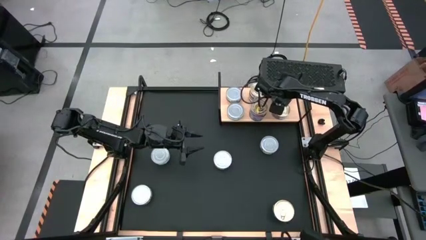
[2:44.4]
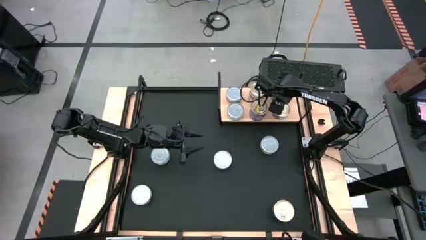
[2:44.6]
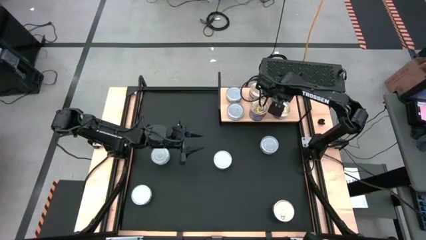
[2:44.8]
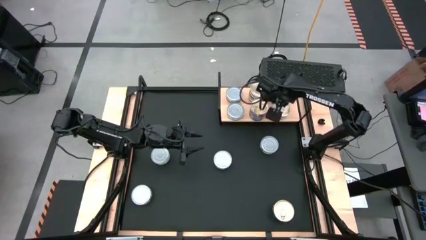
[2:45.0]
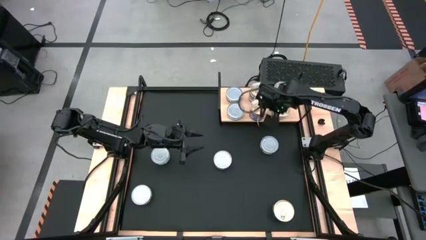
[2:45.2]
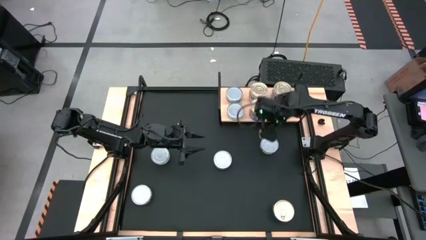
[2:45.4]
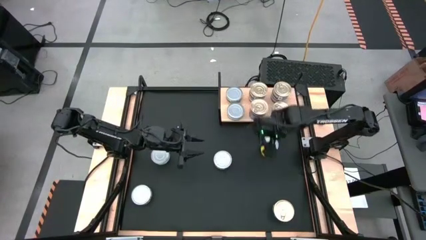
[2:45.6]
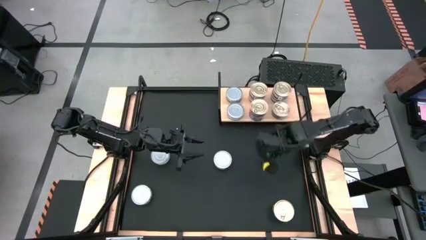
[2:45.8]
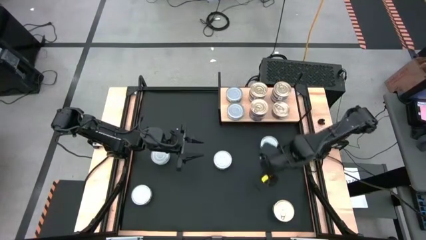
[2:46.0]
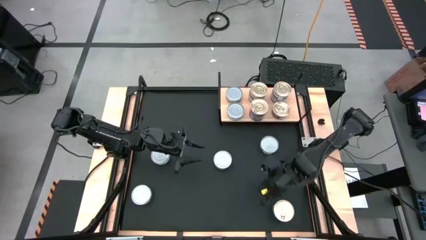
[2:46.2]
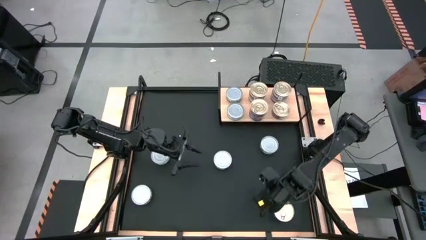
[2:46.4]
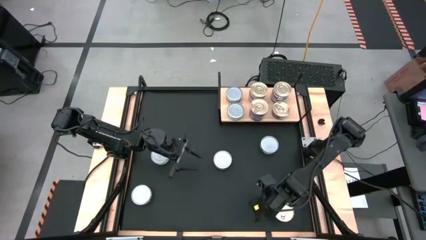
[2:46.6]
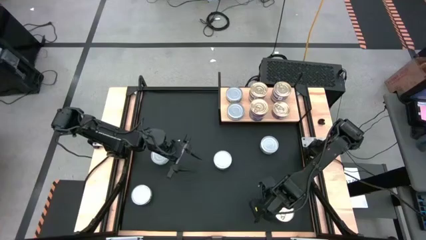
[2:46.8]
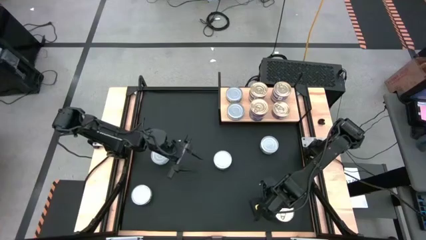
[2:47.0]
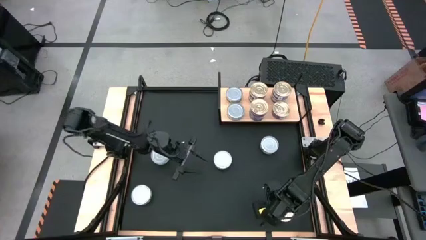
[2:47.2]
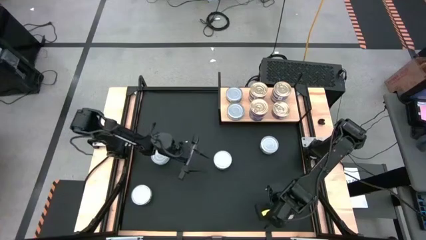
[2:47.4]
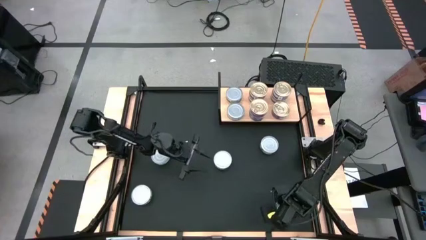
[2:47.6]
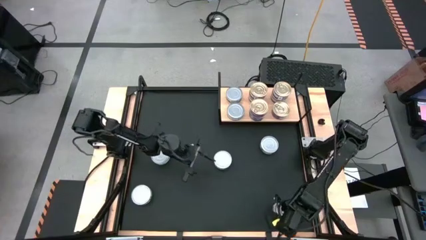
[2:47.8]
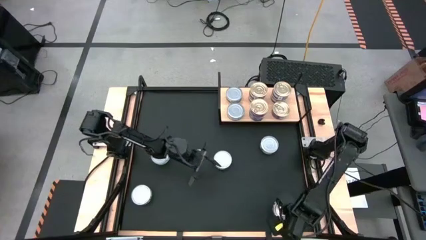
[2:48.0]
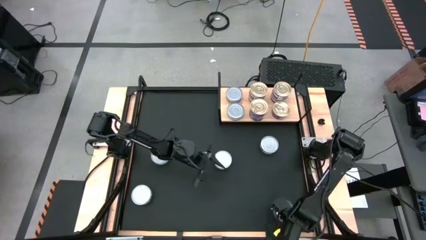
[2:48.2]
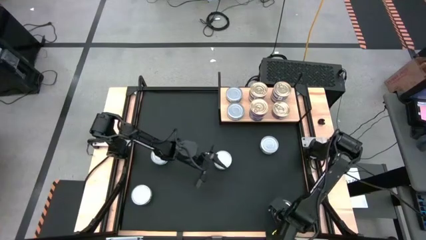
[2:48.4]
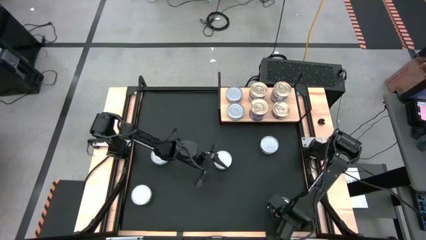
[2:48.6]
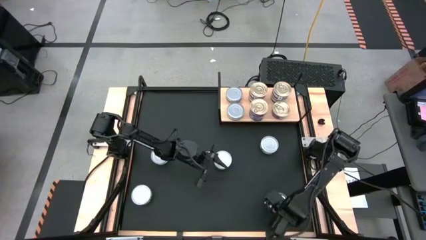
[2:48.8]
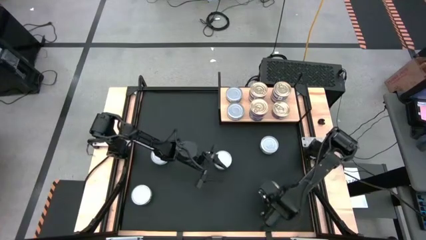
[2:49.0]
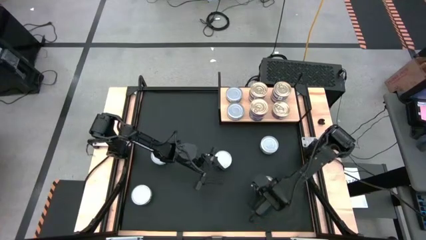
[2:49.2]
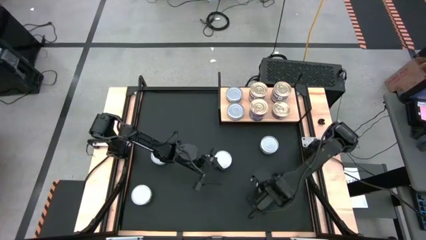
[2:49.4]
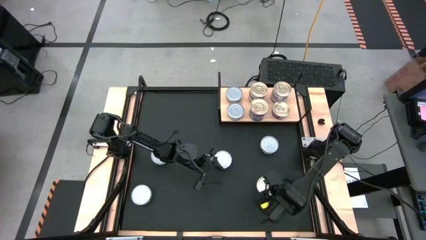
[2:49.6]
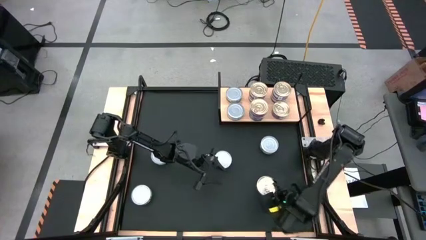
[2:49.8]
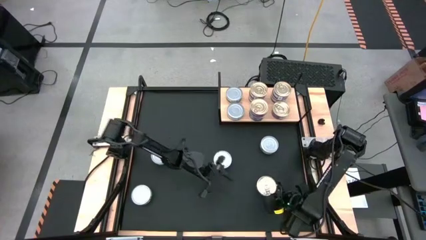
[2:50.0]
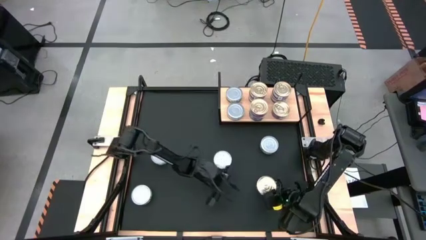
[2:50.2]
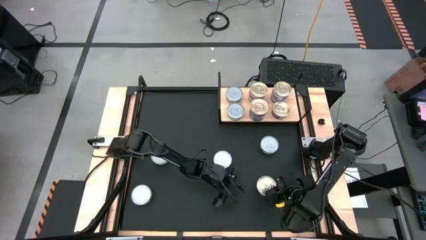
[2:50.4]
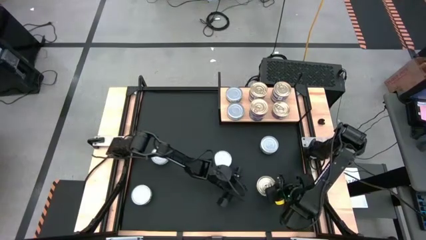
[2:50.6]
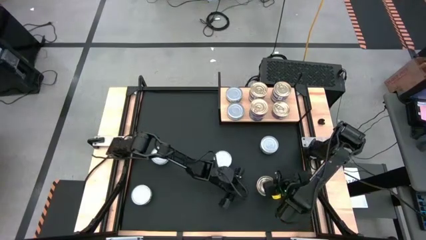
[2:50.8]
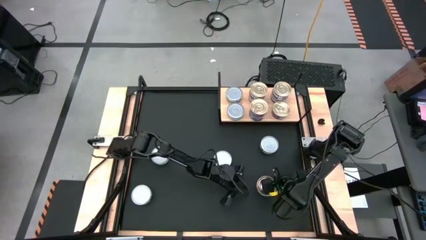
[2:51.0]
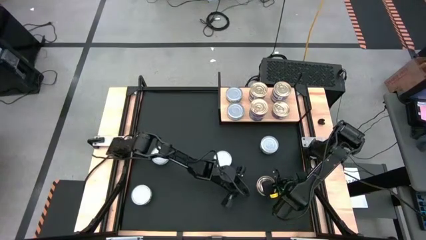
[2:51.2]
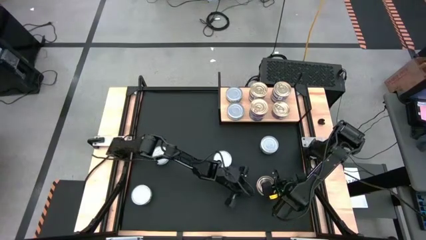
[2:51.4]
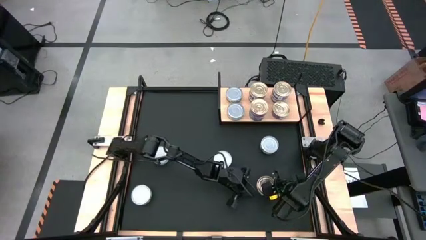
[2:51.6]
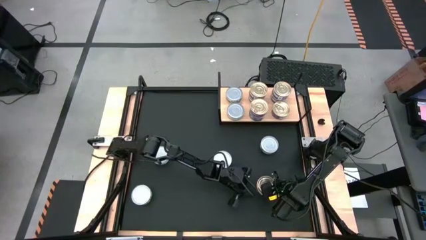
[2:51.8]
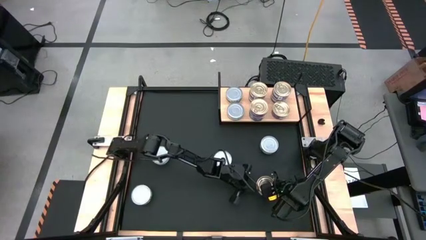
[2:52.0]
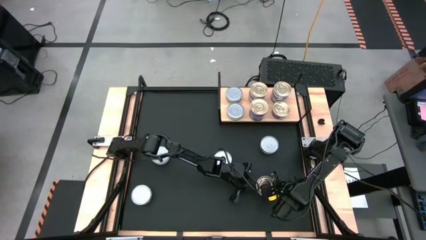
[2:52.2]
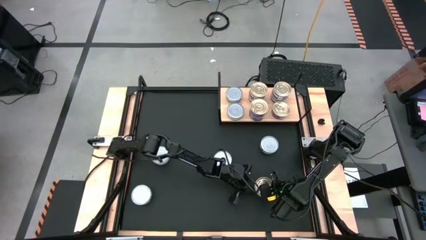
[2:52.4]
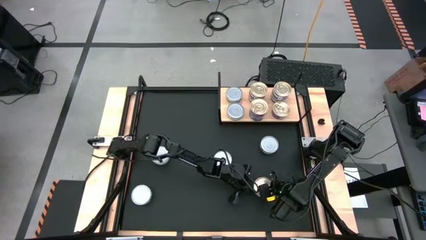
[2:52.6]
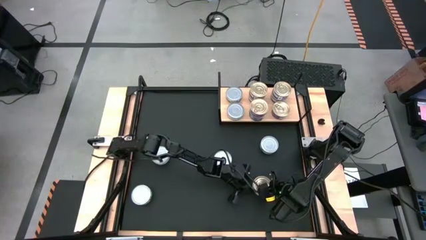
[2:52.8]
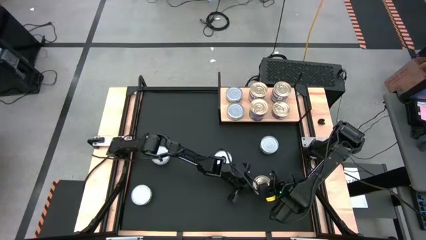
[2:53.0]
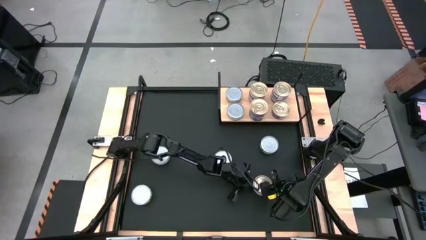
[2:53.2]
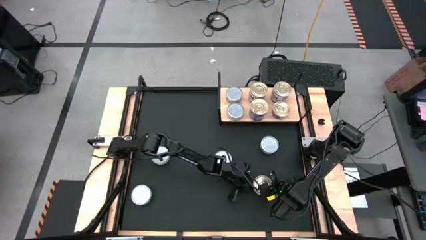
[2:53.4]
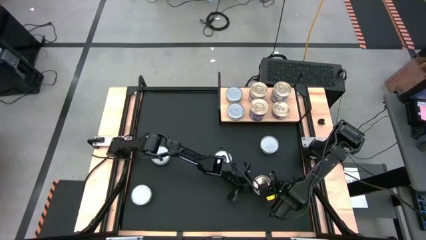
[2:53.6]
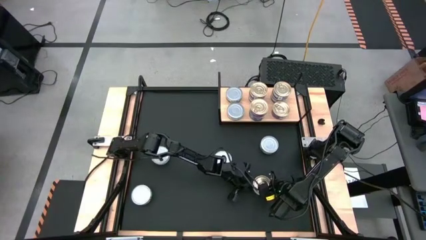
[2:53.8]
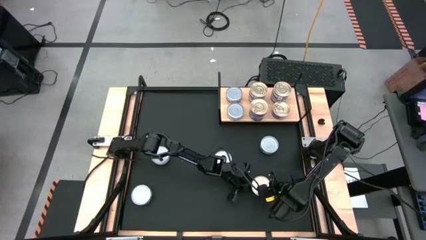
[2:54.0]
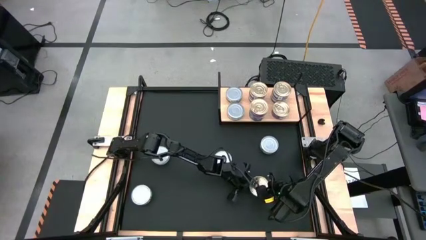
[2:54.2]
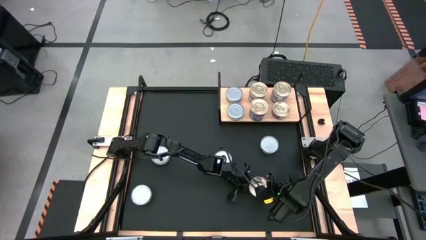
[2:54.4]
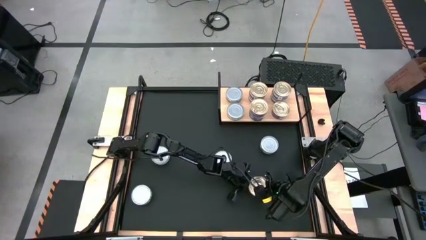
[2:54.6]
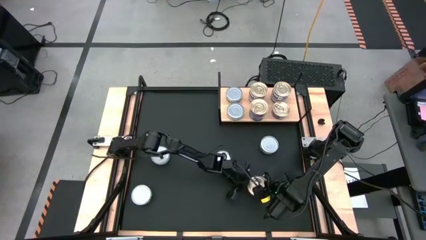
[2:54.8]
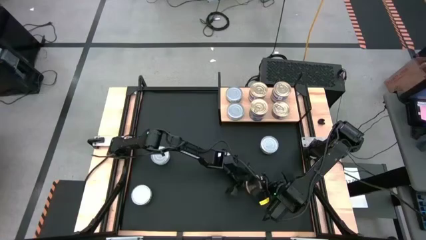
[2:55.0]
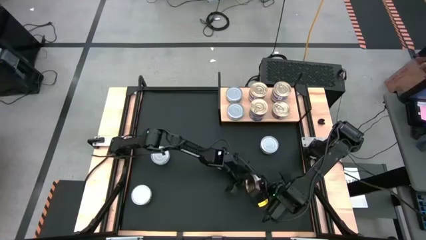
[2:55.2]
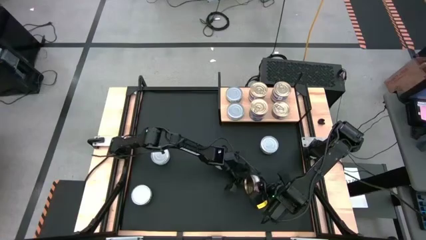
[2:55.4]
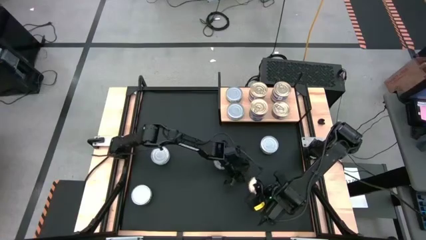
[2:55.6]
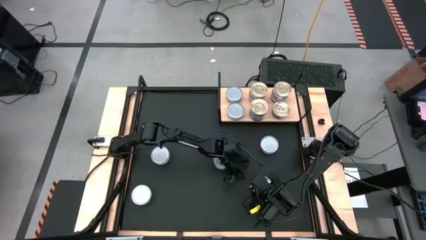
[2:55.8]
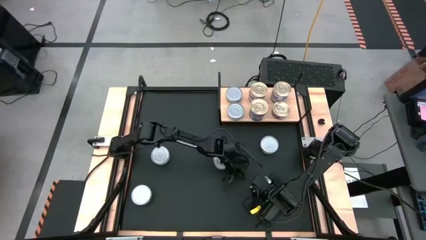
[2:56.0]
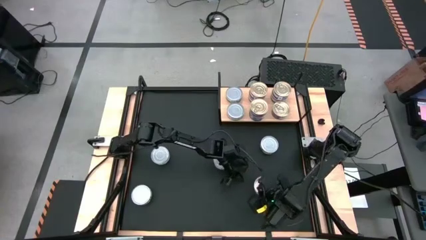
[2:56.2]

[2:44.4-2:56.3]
Task: Stack canned seafood by type on shelf
Stack the blue pink tuna can on top of the other blue pink tuna can on the shelf

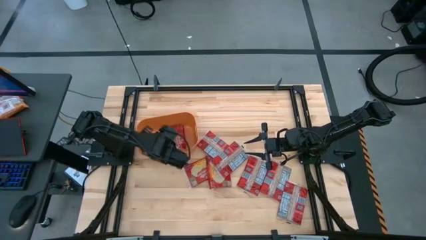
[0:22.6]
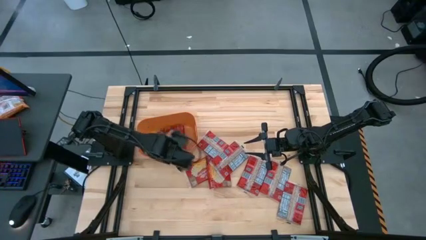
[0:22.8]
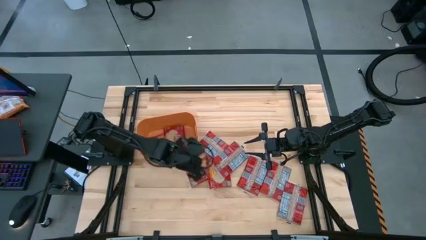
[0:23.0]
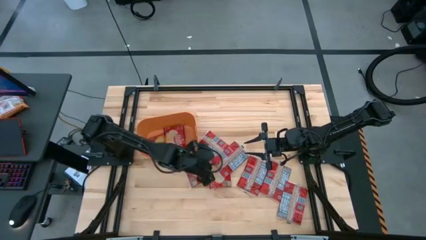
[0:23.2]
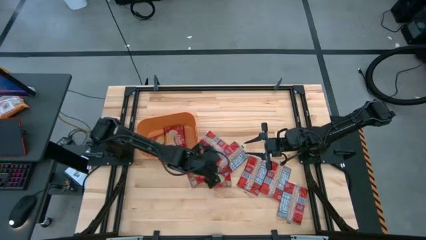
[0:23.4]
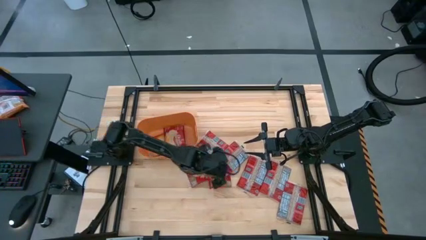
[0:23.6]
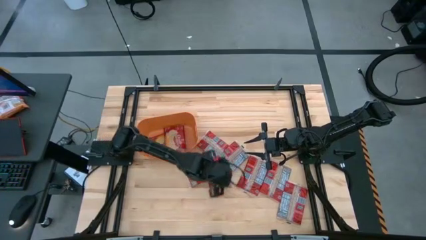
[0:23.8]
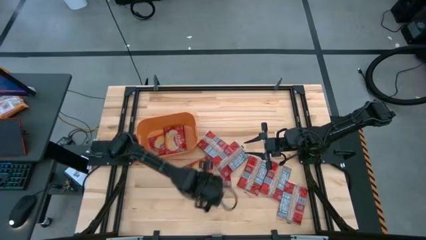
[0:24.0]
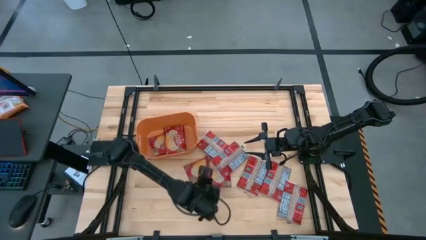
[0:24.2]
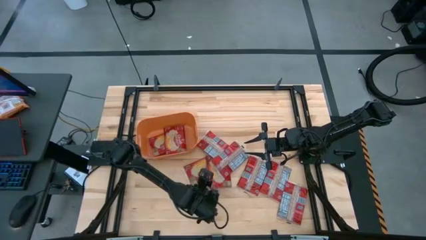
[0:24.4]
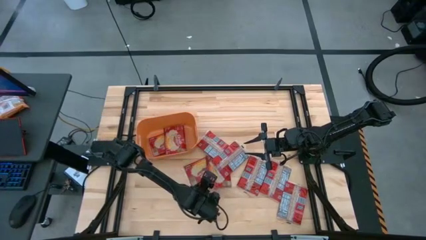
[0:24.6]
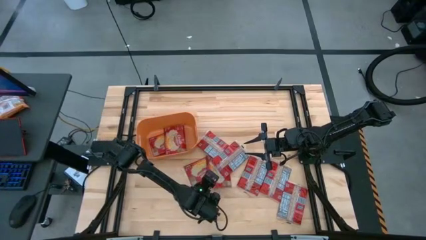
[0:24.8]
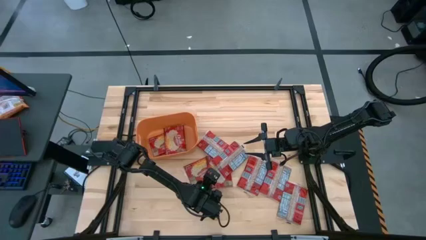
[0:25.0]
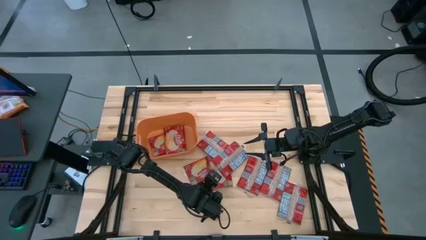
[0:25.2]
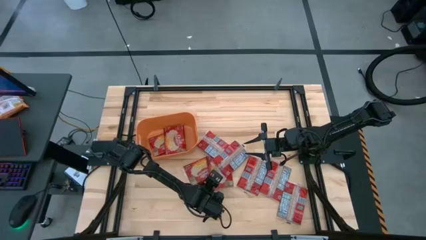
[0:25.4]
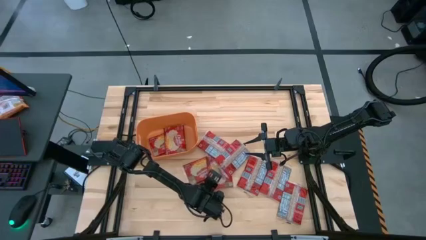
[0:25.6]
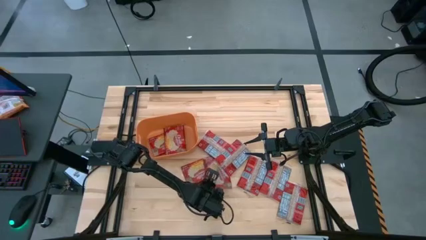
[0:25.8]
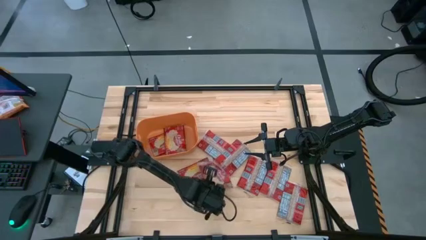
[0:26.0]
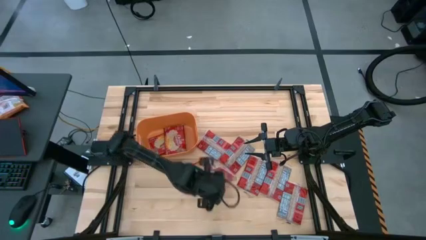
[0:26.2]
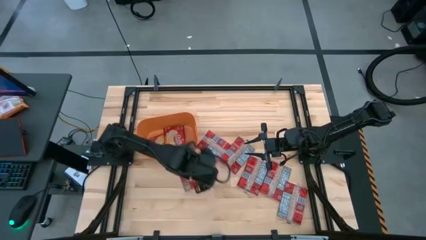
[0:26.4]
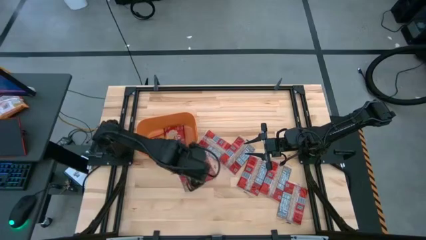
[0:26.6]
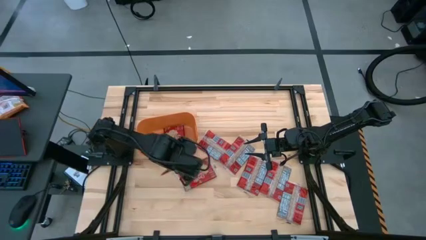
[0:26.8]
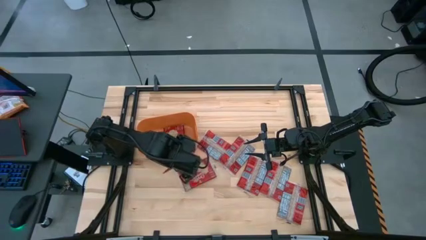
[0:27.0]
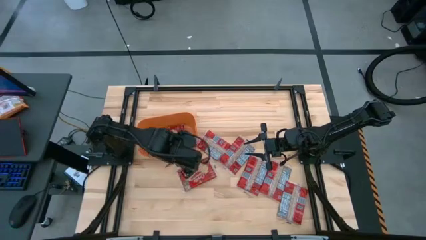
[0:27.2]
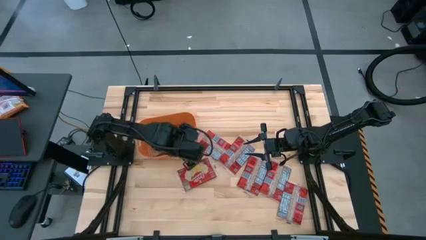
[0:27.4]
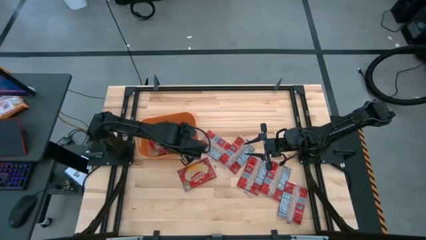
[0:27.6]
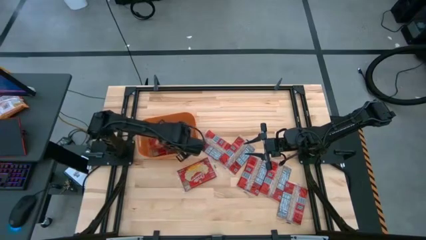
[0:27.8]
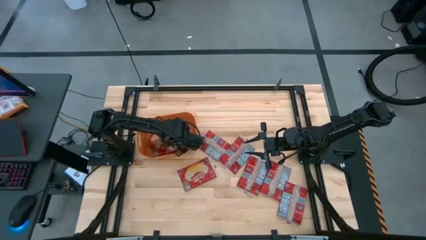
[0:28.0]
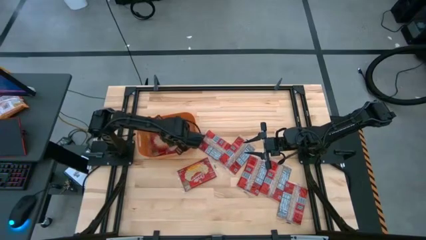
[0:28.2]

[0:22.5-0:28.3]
Task: Sort popcorn bags into baskets
Put the red popcorn bag into the orange bin
